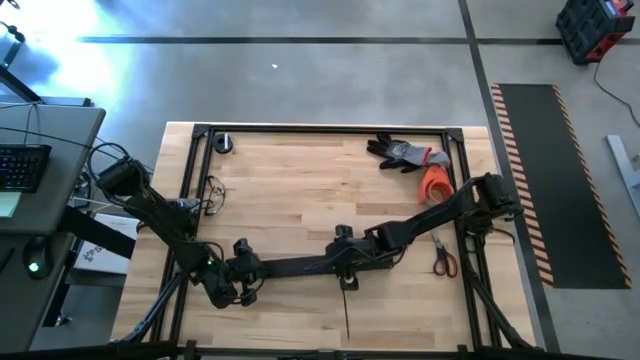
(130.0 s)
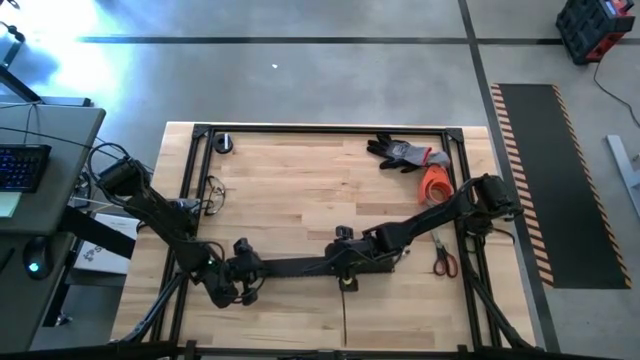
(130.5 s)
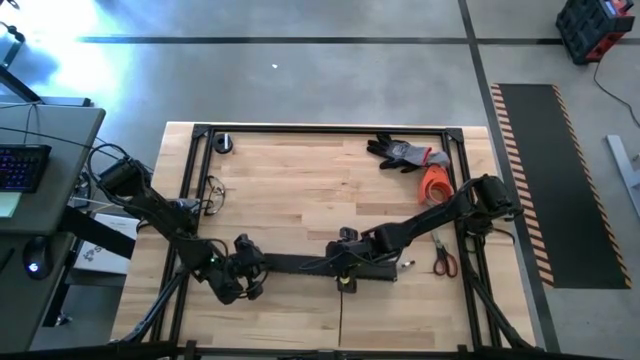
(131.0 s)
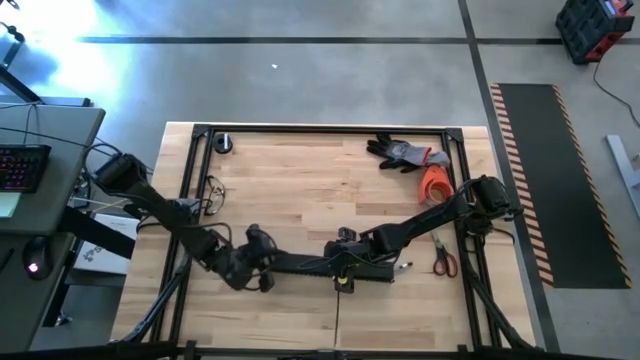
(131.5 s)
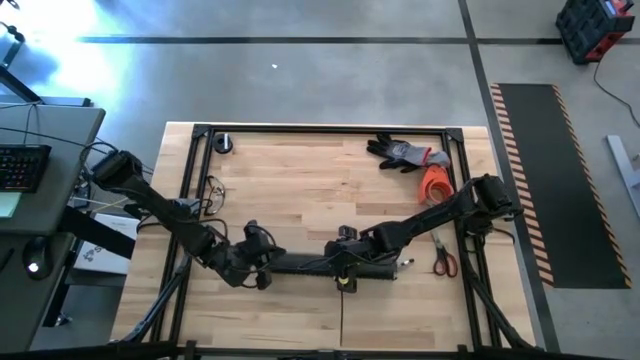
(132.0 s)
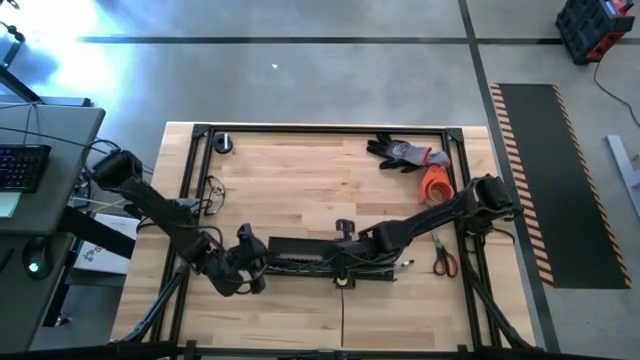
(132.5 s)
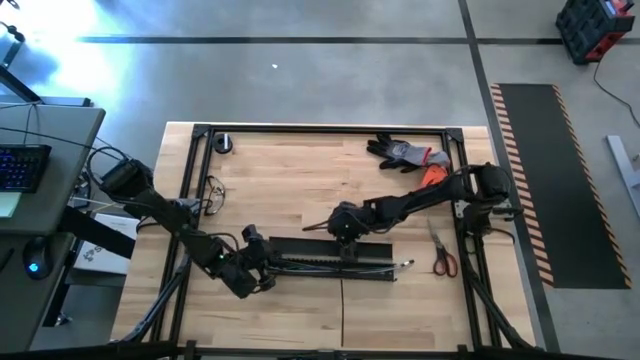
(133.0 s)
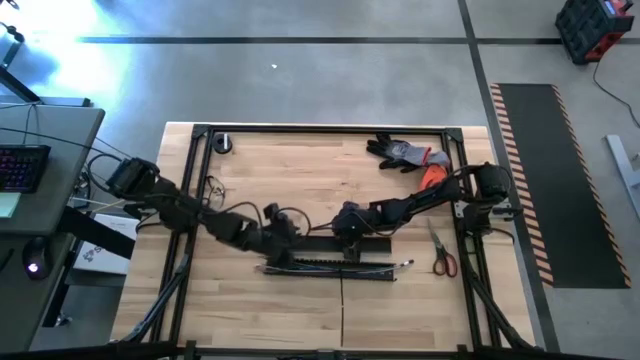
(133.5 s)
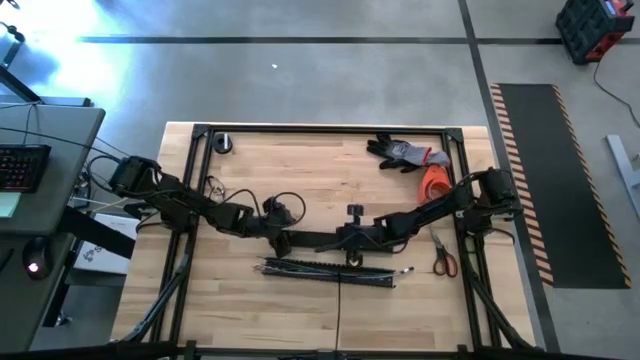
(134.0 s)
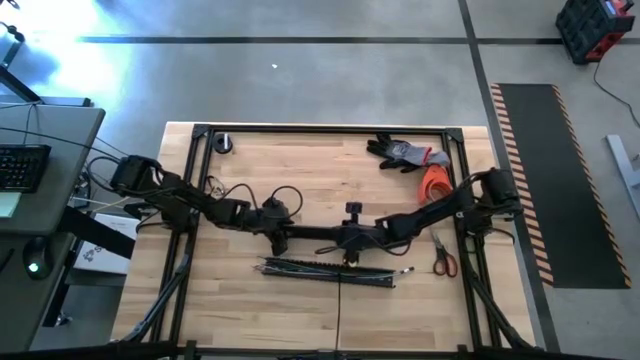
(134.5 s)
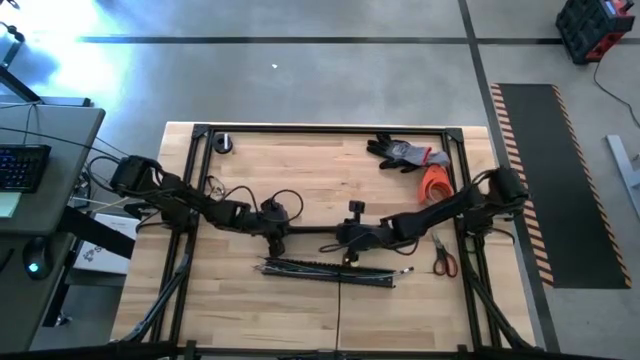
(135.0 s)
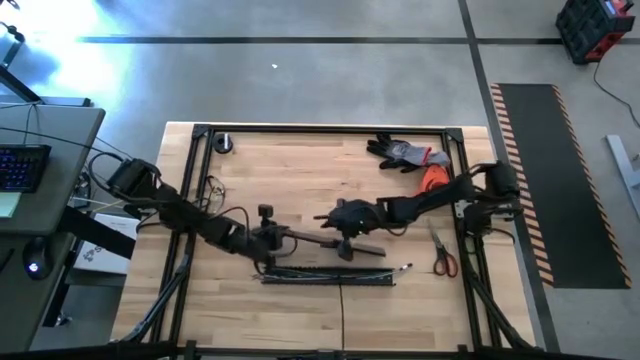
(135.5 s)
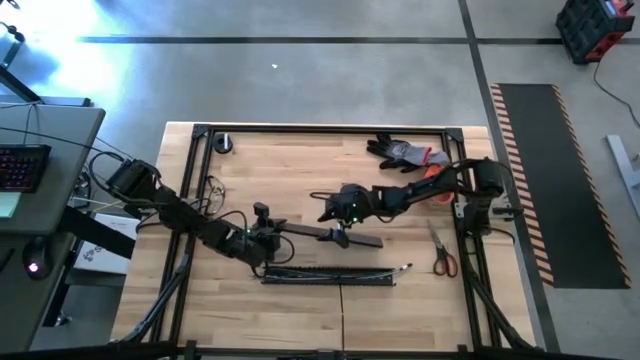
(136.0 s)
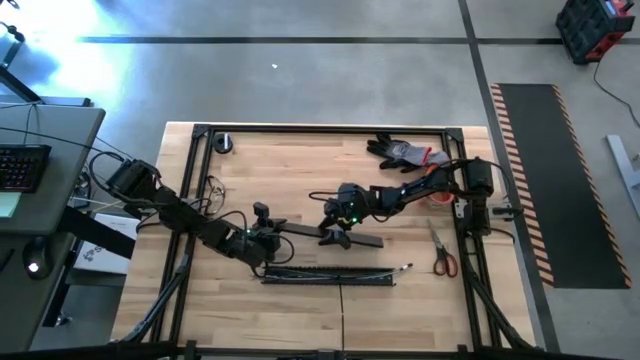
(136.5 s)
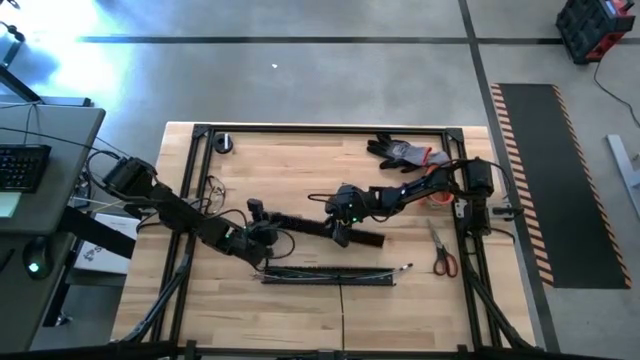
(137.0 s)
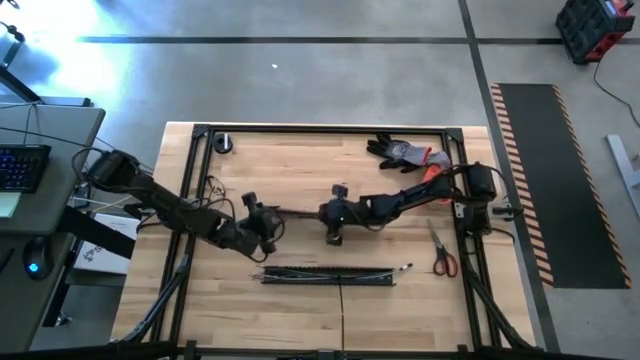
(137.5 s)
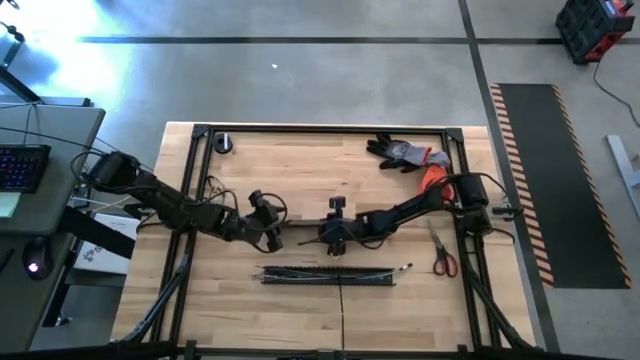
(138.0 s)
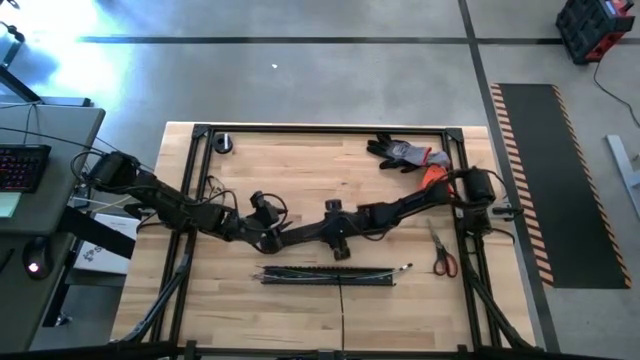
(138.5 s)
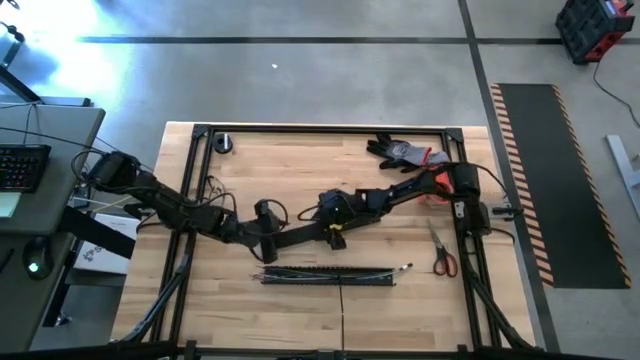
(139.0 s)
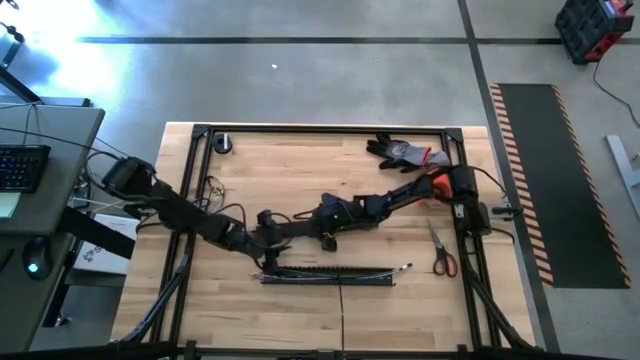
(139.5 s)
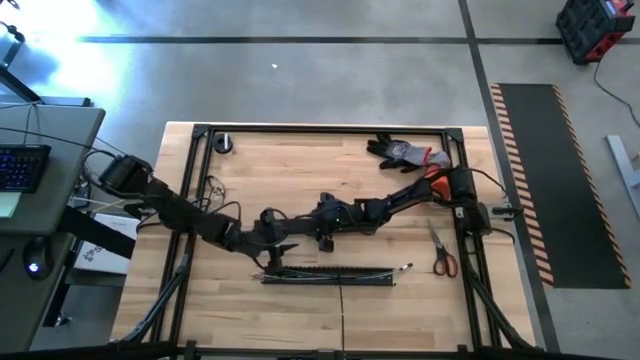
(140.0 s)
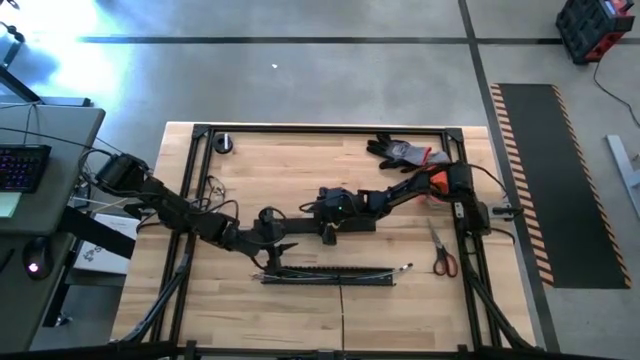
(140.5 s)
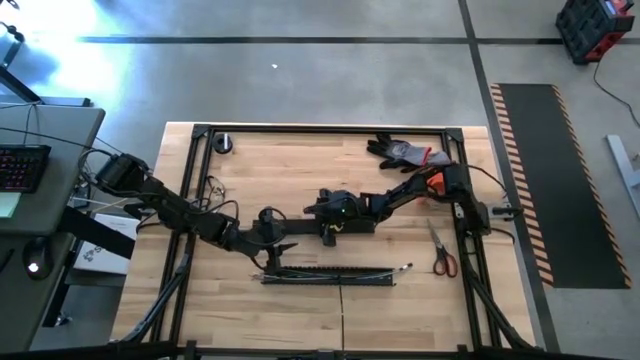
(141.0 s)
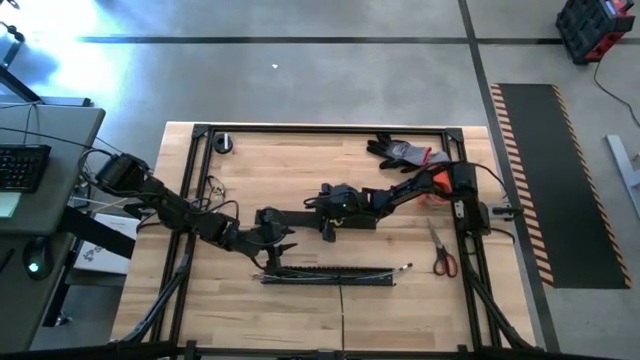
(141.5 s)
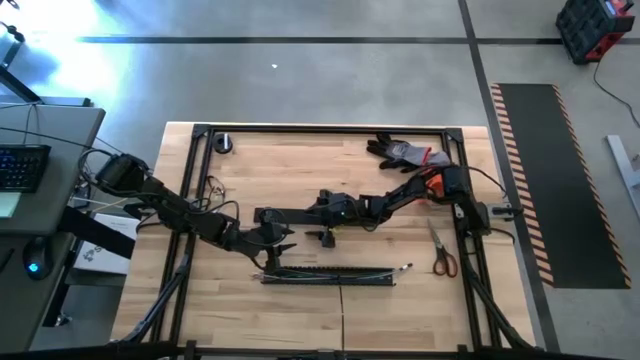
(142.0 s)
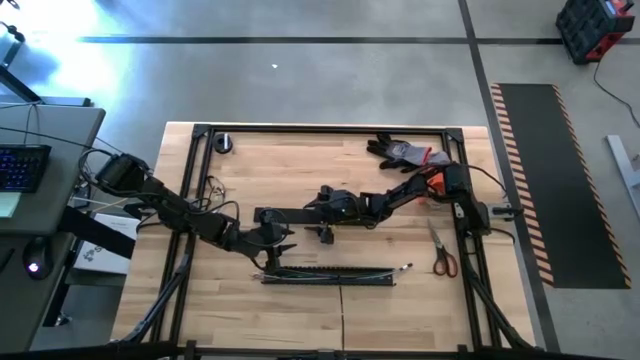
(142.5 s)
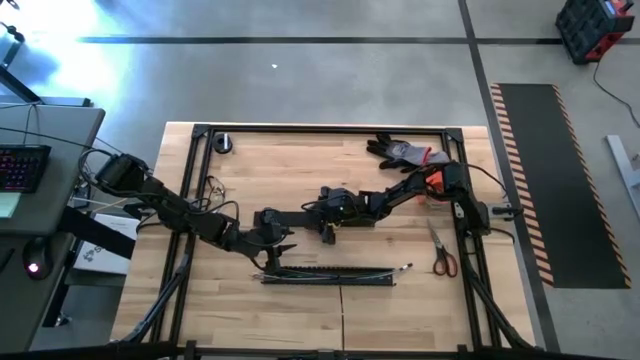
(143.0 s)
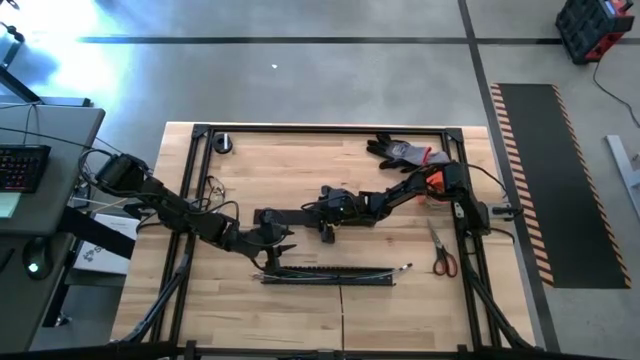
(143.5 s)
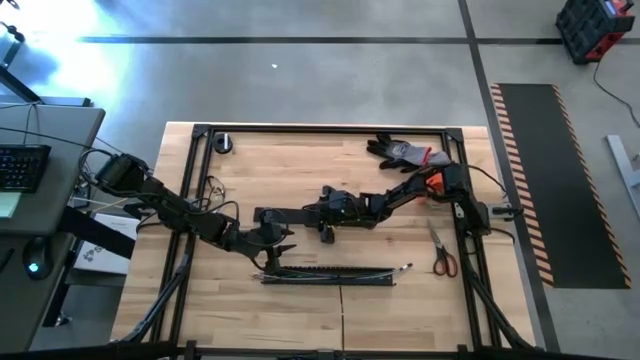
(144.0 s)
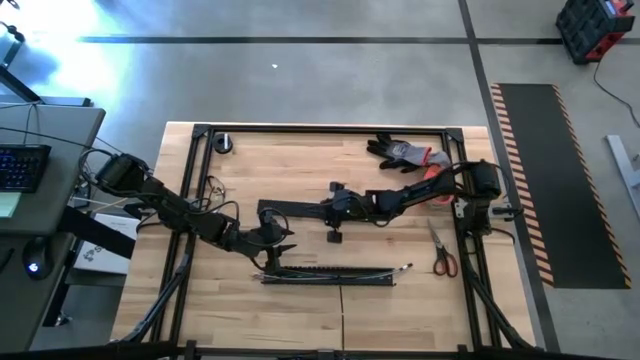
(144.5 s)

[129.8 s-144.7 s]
Task: Ziptie cables
Close the black cable duct

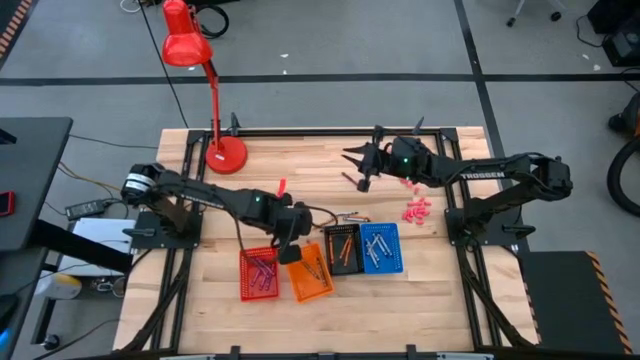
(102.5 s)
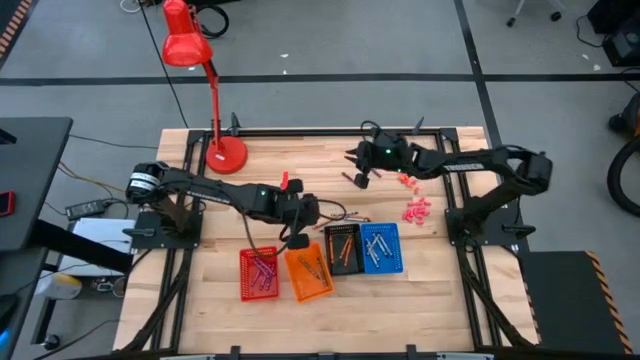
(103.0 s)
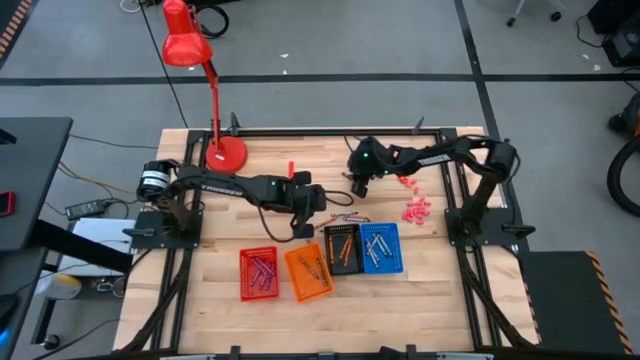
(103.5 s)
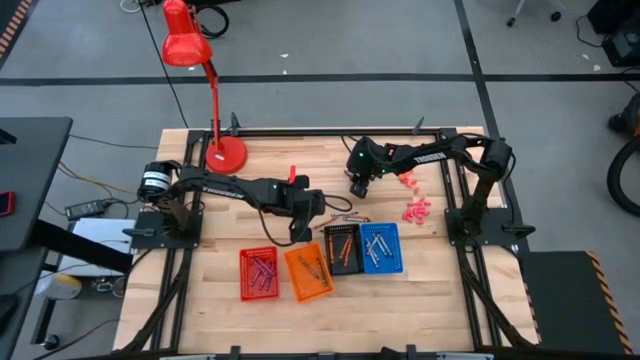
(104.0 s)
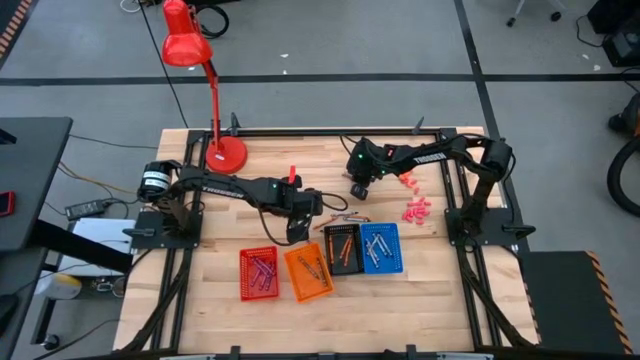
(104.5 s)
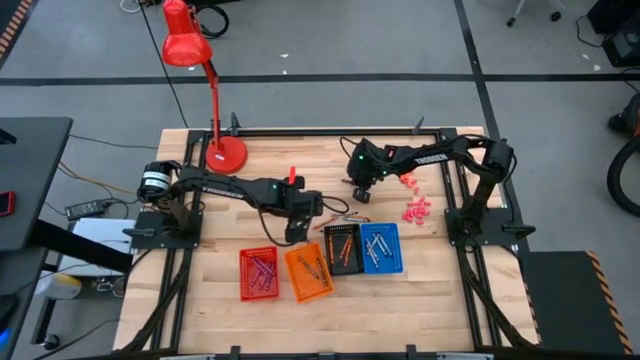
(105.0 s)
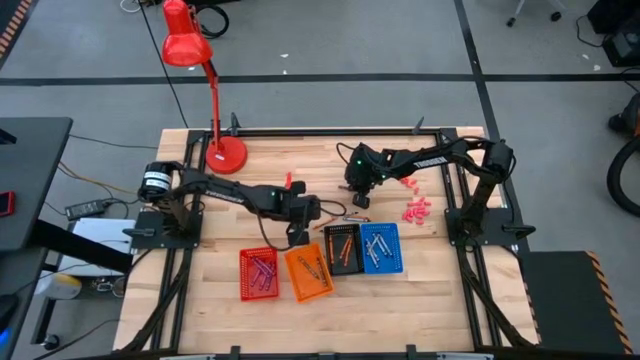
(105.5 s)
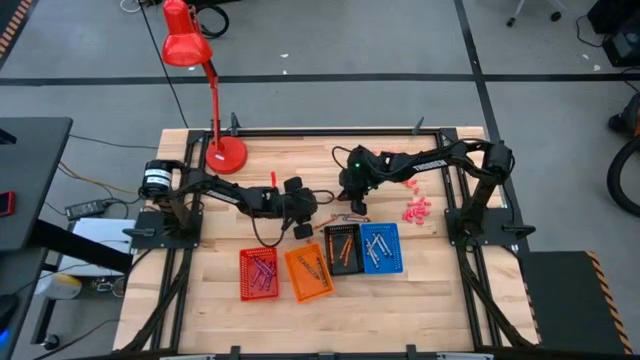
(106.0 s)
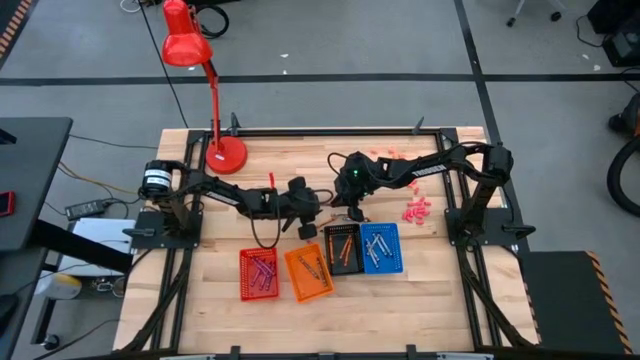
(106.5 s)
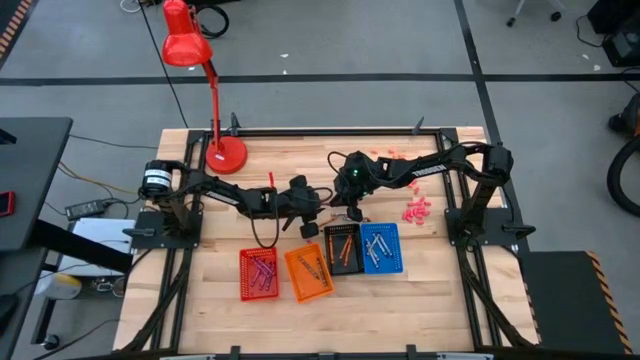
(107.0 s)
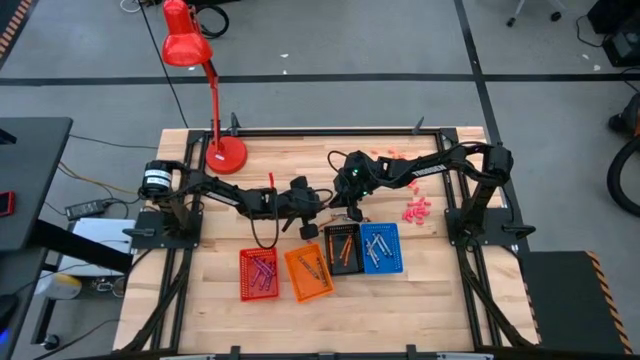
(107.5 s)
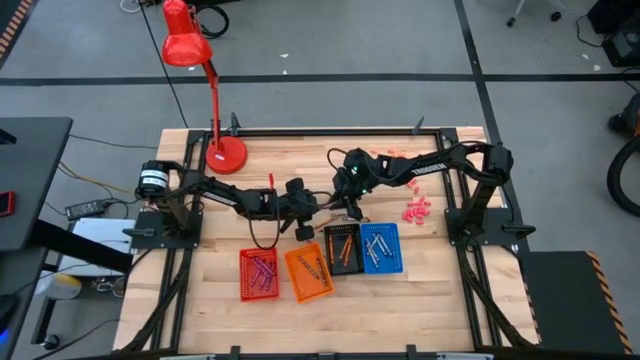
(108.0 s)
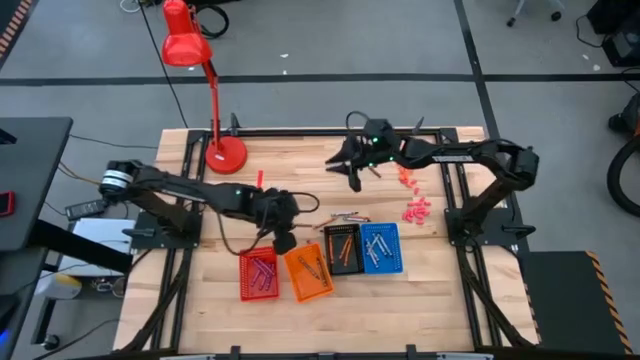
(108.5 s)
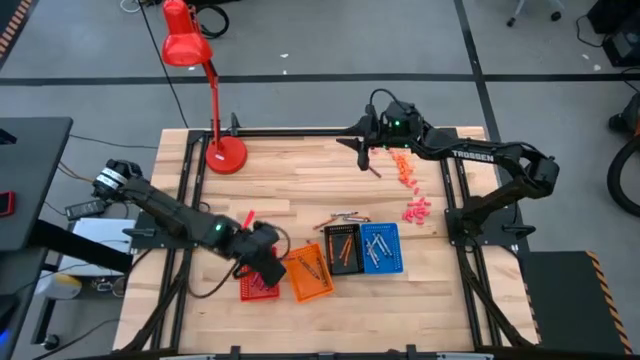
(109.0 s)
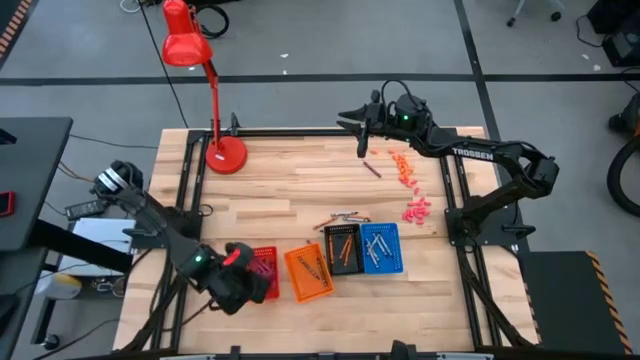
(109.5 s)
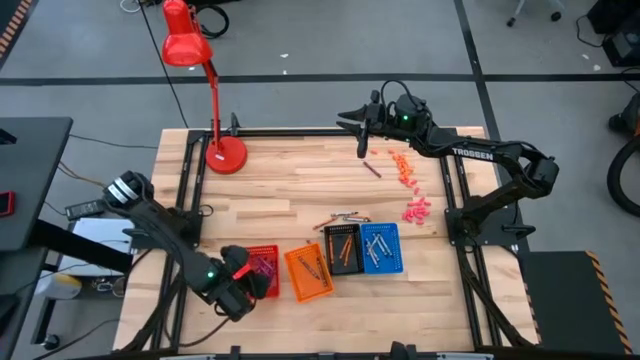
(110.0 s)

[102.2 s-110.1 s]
Task: Sort crayons
Put the pink crayon into the red bin
